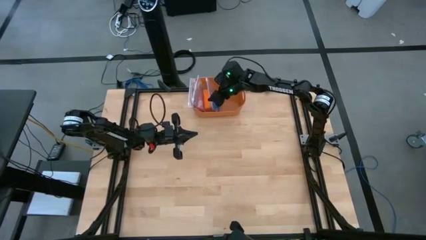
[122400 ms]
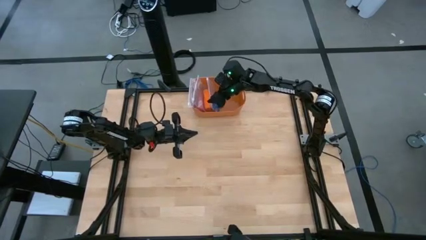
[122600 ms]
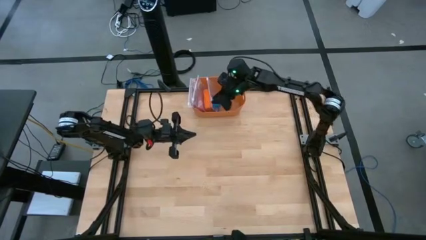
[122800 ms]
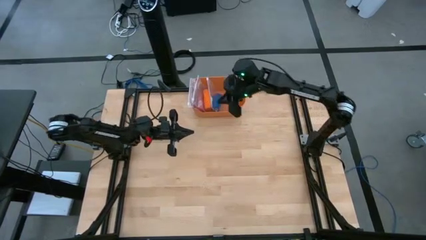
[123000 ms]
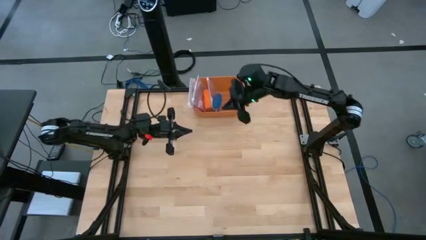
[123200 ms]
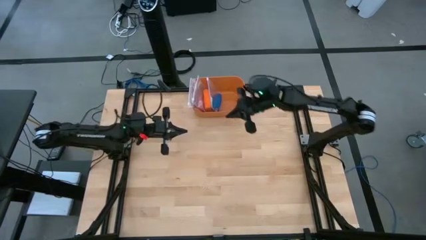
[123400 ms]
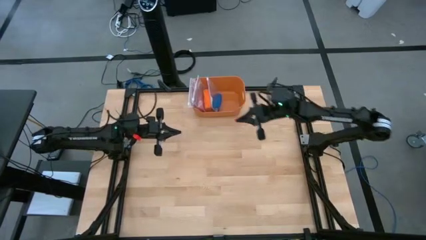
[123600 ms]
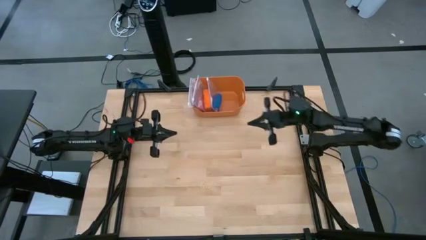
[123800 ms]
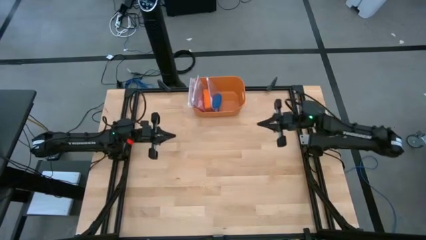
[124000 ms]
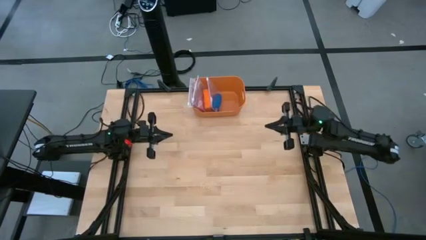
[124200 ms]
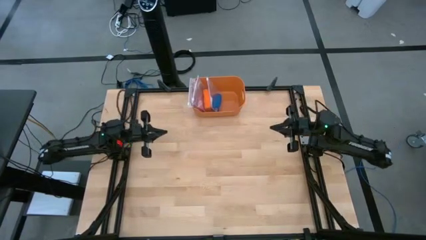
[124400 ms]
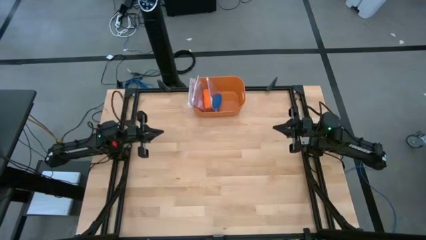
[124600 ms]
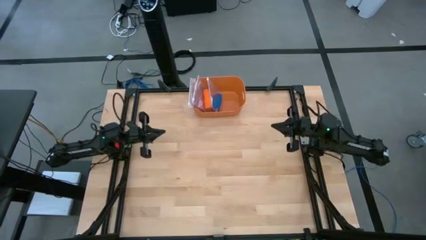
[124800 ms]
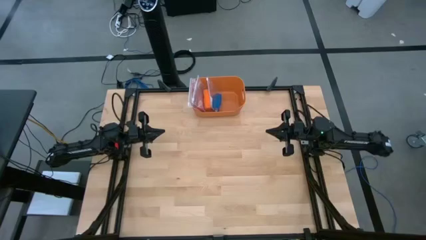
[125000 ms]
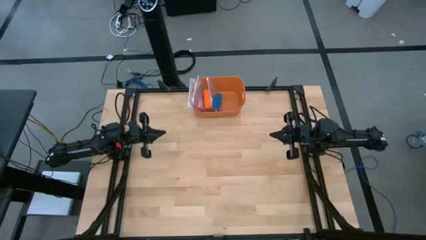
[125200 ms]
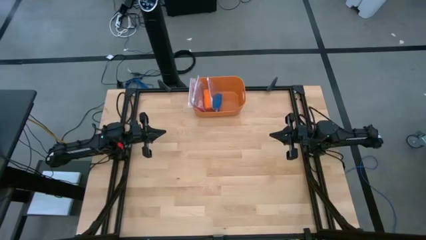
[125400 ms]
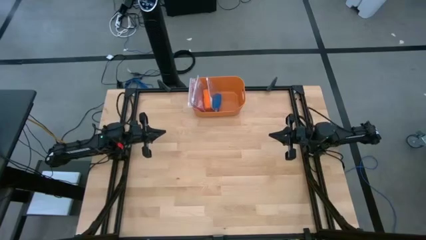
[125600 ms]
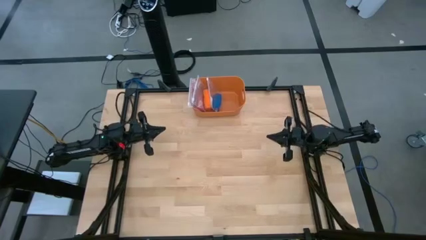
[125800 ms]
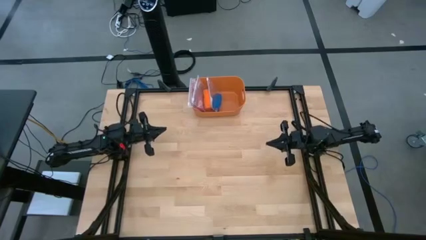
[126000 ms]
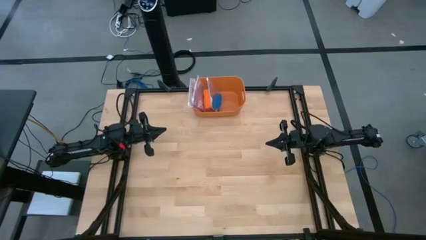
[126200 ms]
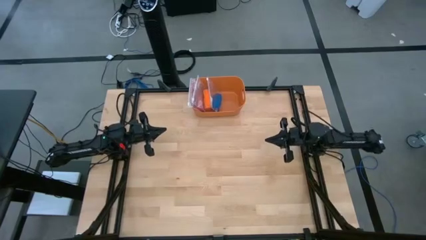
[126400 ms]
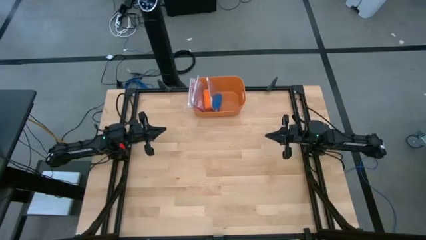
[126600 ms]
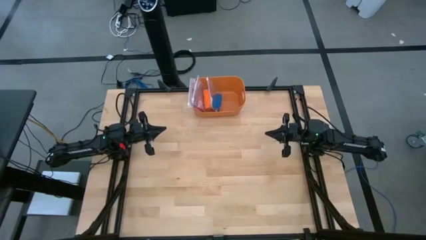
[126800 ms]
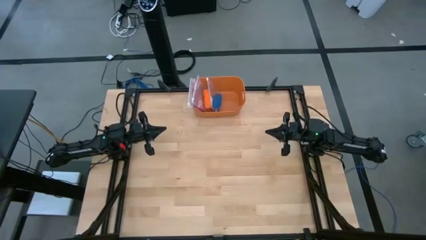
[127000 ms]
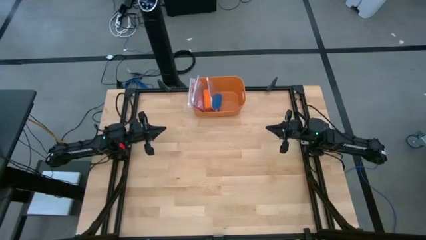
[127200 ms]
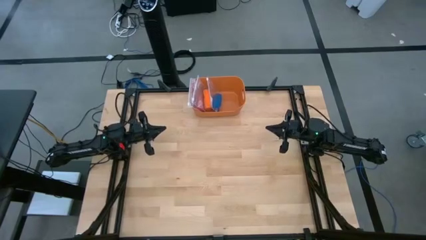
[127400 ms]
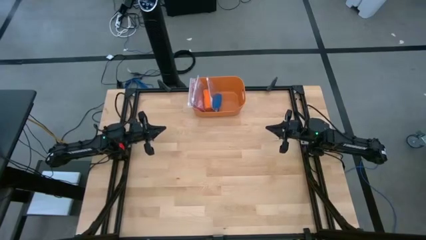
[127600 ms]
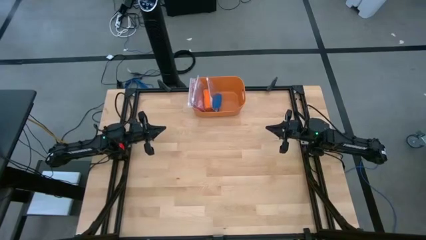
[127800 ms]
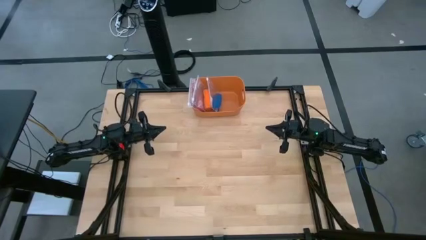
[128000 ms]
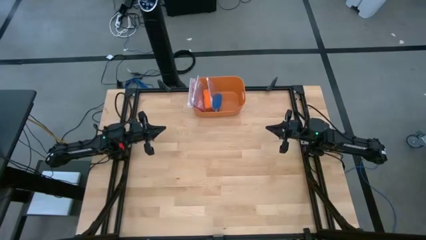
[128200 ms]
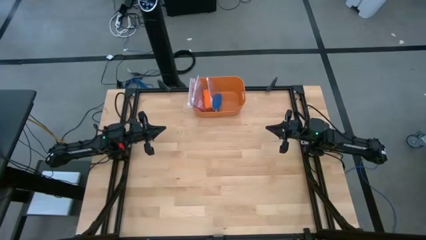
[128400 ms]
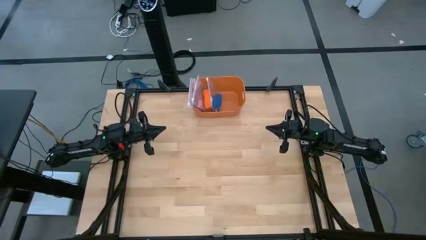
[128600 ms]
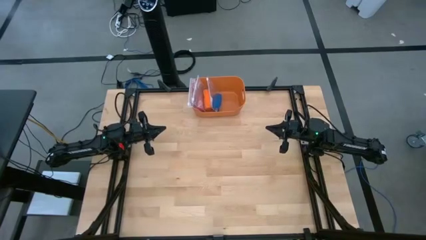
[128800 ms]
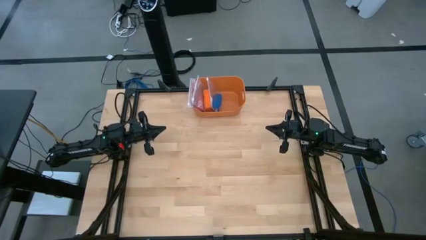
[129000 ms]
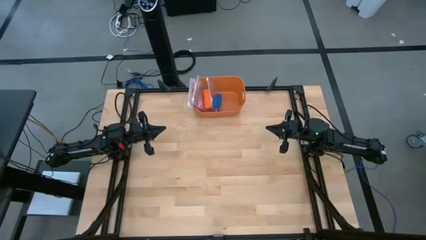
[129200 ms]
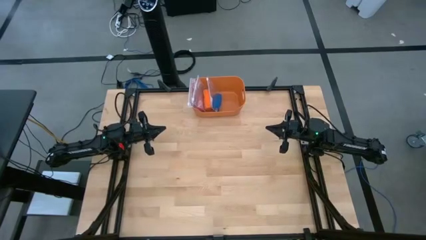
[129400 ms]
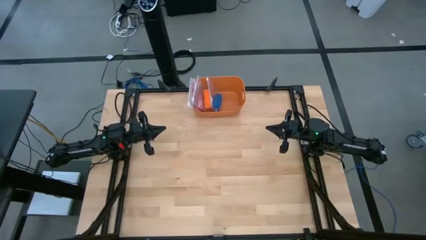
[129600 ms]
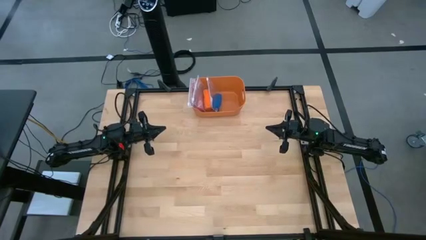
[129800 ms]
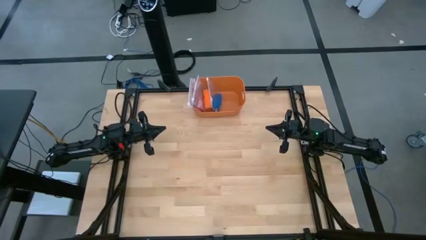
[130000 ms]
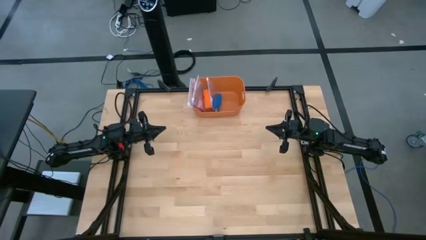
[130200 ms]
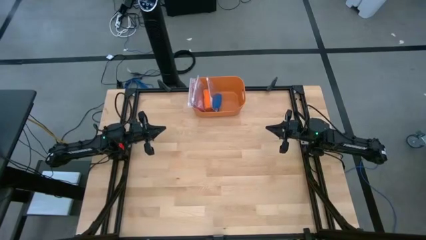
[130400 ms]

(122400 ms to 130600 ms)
Task: Roll bandage
Return to Home Position

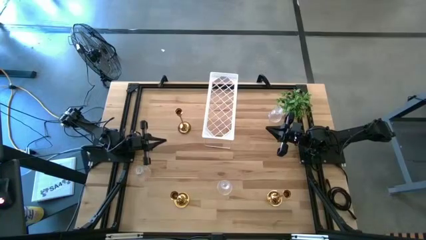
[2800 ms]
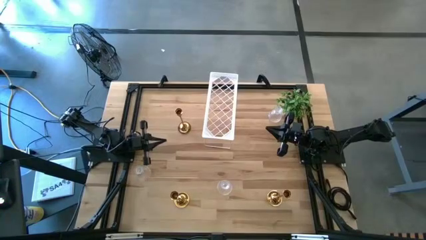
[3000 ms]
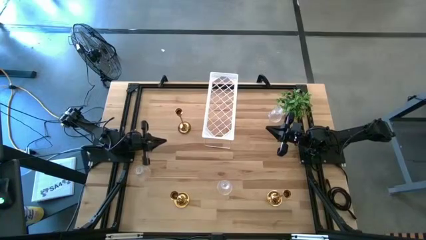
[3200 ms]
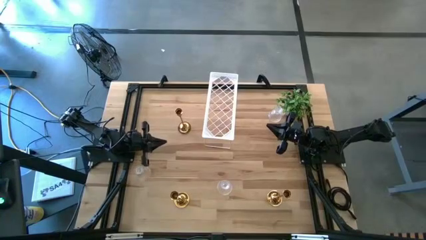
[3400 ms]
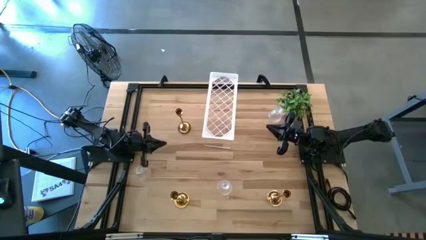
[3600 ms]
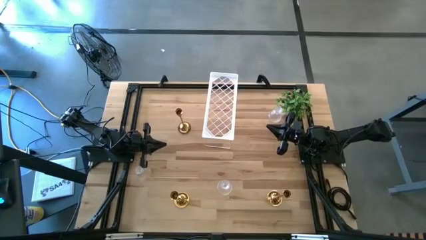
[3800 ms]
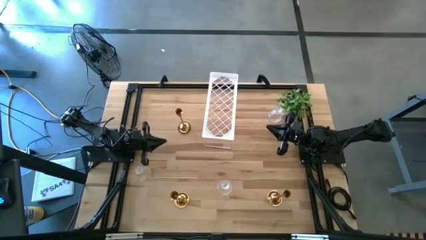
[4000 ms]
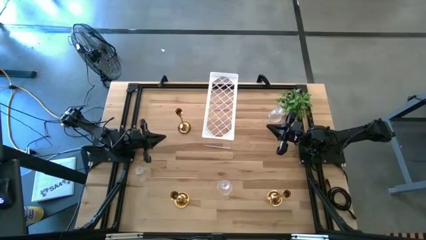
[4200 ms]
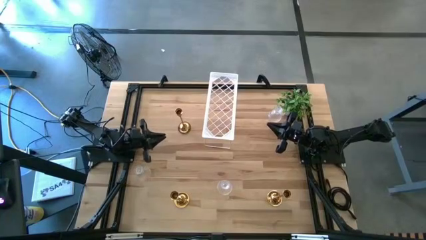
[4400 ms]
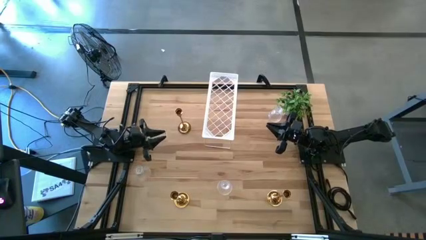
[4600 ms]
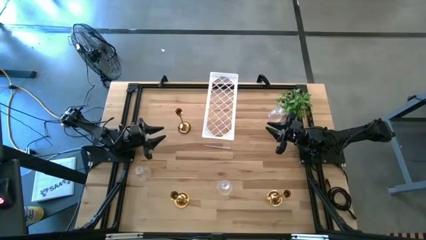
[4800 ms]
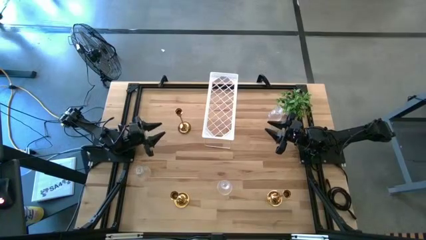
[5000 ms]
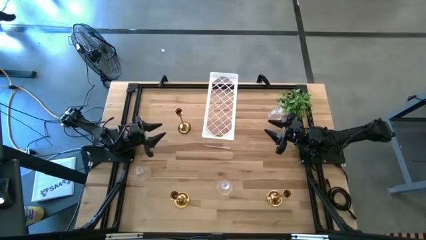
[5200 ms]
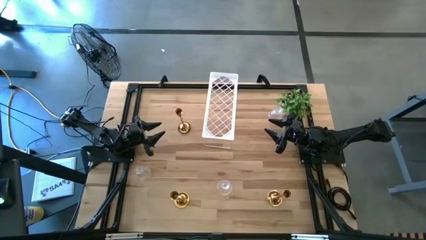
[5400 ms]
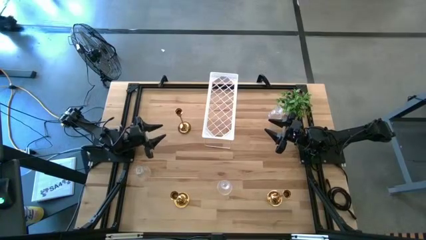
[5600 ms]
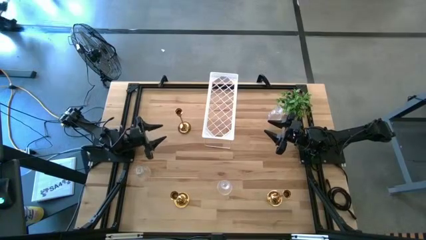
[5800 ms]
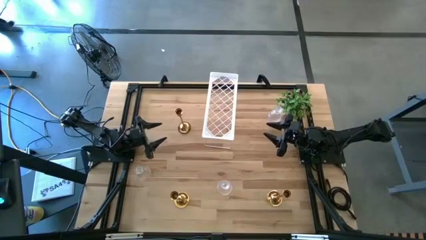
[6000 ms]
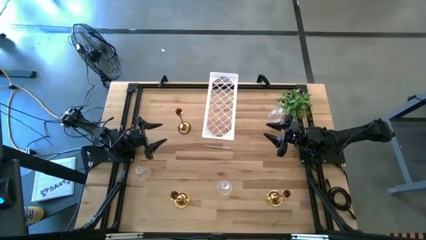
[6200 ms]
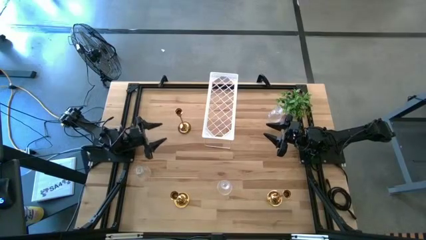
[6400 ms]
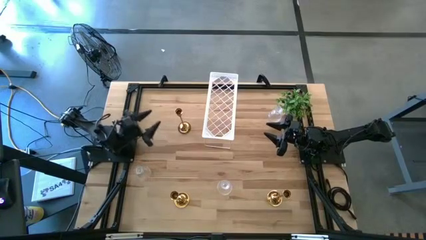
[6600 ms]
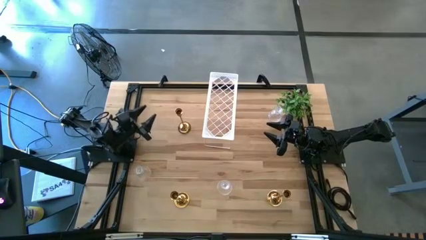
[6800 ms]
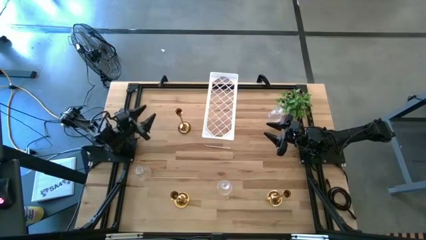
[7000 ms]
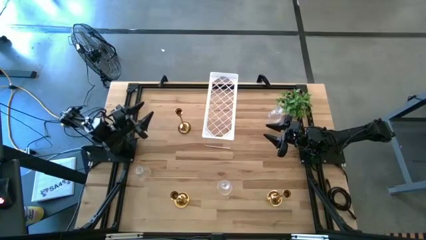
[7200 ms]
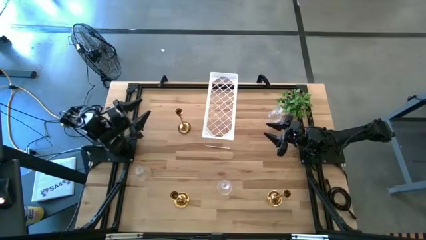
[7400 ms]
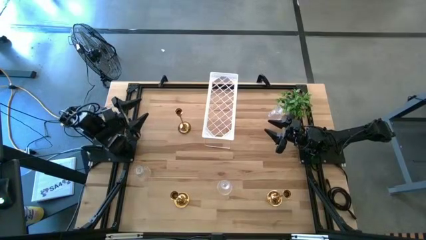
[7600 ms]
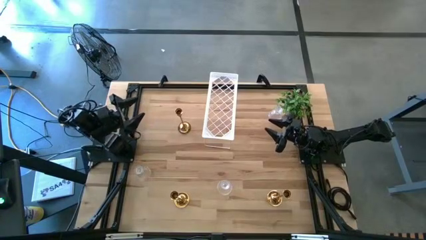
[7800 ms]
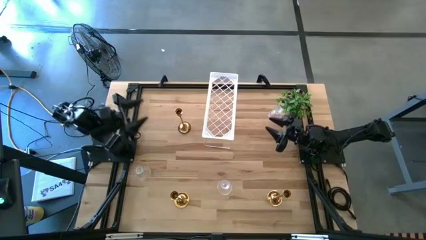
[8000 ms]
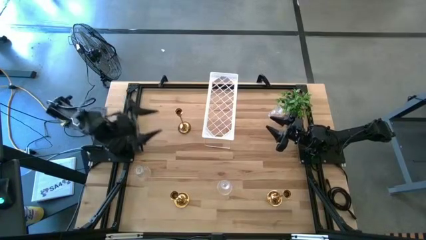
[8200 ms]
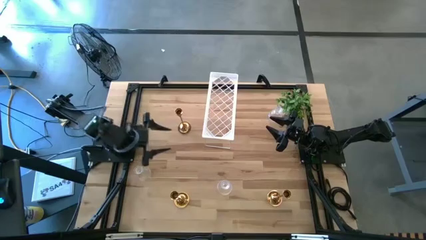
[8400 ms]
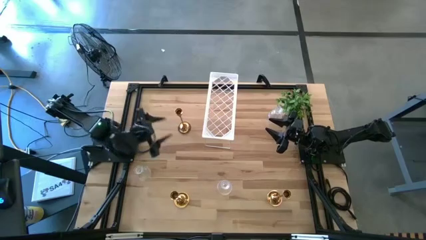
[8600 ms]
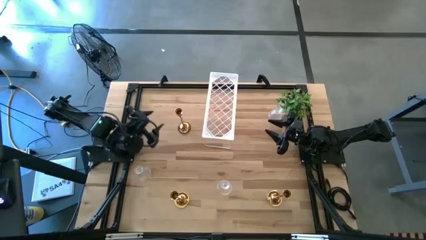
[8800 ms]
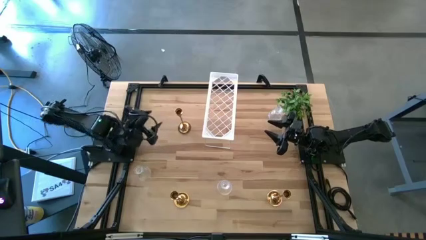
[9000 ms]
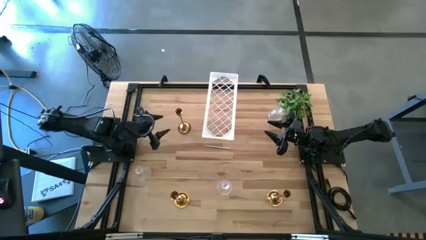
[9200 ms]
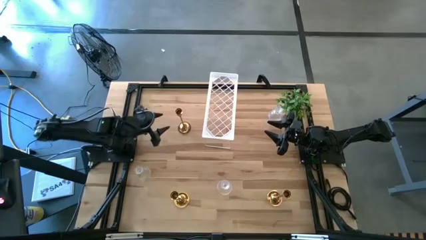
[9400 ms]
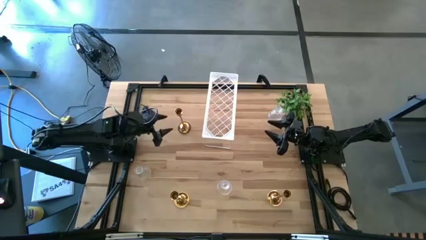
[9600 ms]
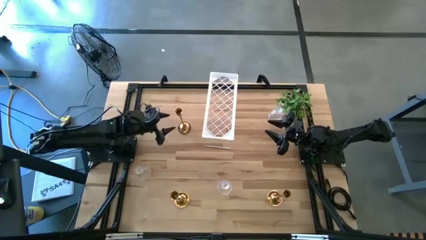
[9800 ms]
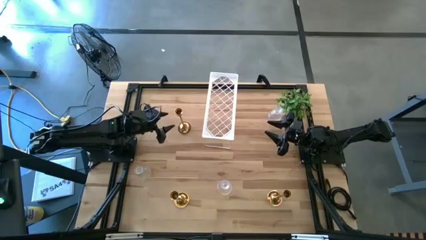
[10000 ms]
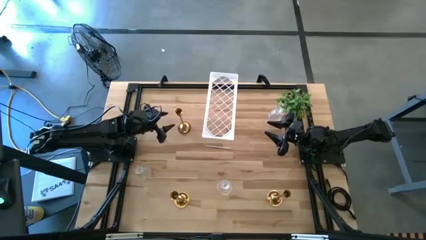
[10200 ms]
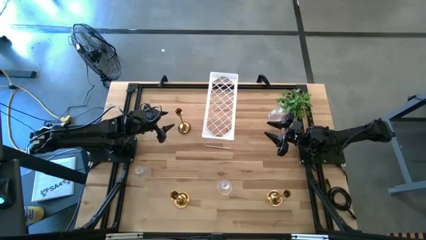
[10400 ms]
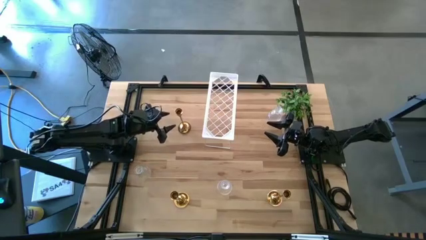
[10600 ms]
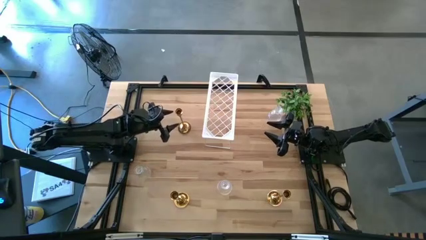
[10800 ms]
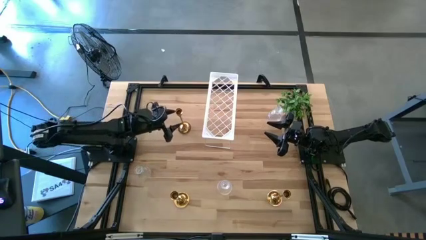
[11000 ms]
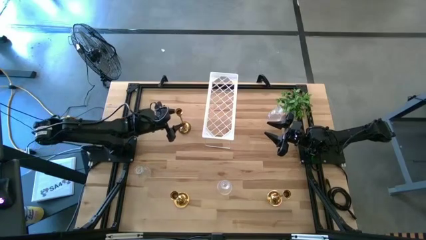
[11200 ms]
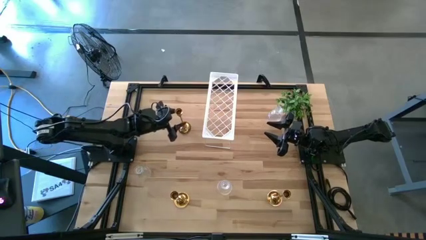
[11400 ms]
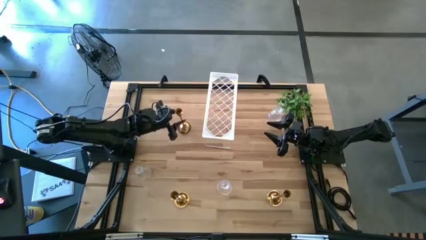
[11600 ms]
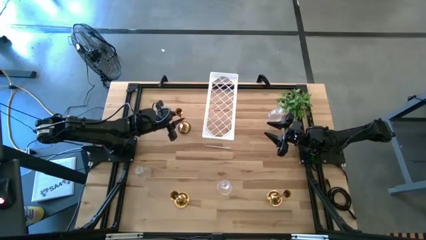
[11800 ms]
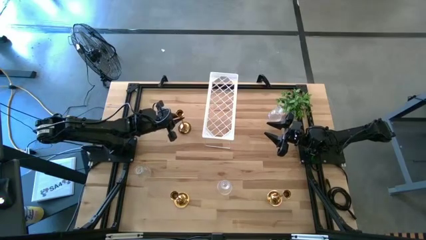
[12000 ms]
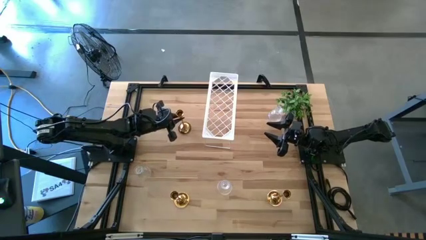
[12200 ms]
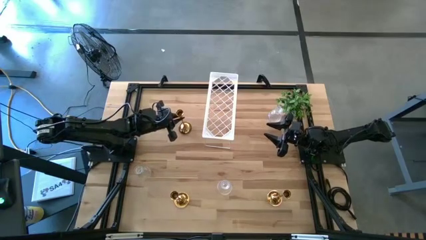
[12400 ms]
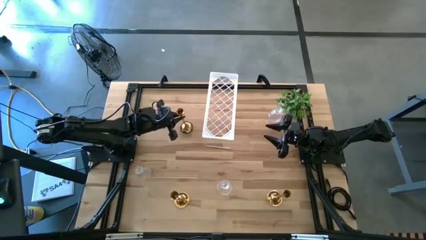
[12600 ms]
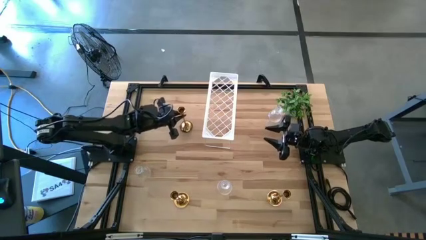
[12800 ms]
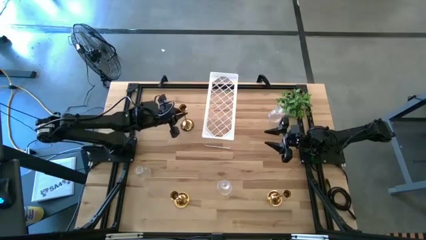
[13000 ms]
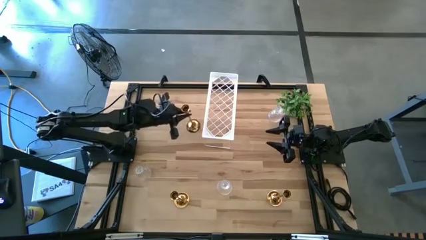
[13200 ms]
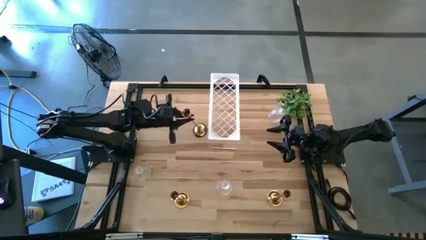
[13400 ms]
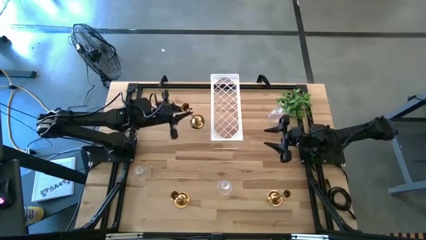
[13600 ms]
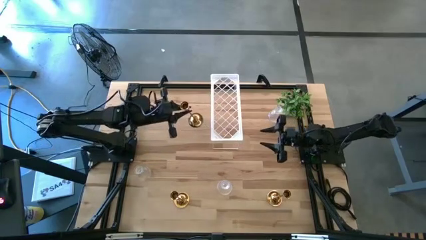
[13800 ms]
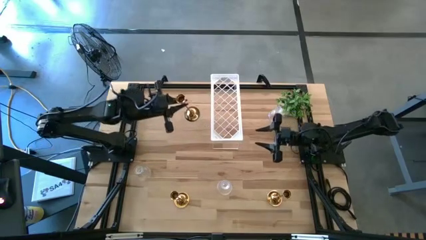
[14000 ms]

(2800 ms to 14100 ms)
Task: Pick & Place candle stick holders
Put the top left gold candle holder on the shelf
